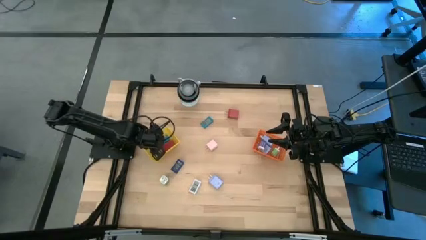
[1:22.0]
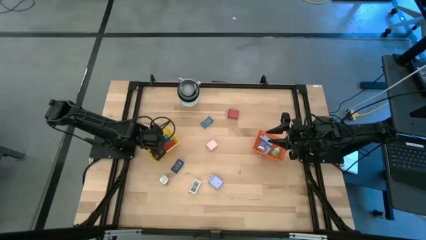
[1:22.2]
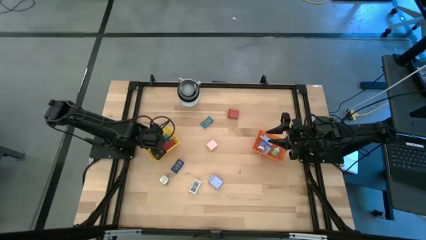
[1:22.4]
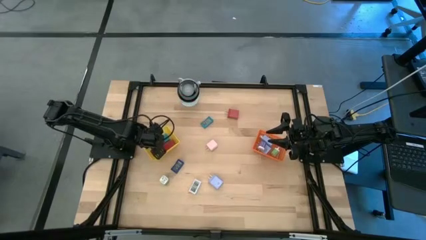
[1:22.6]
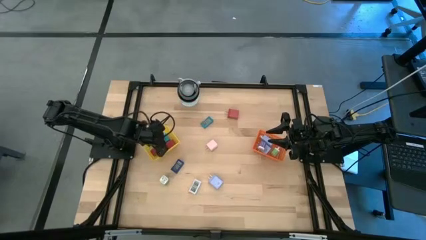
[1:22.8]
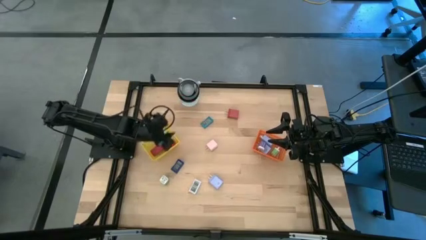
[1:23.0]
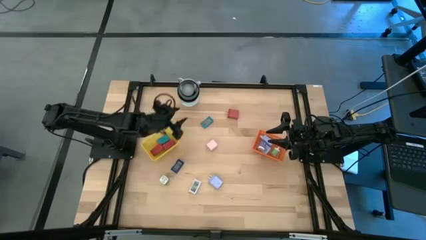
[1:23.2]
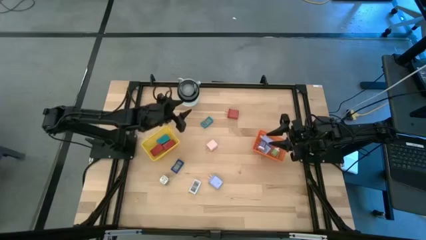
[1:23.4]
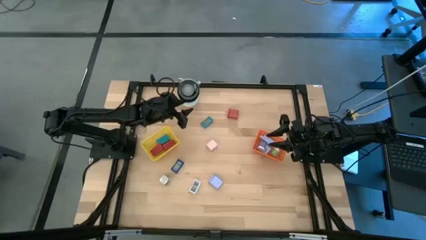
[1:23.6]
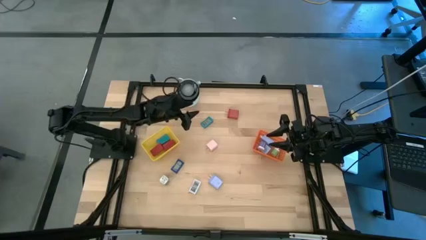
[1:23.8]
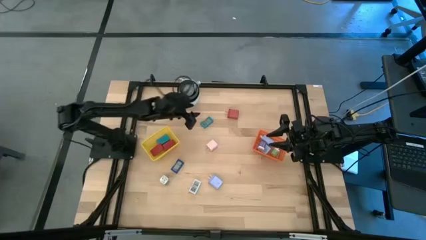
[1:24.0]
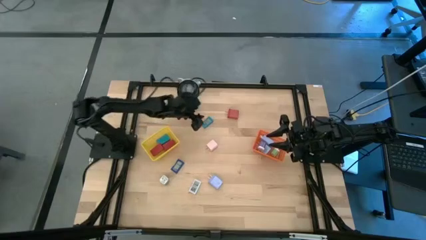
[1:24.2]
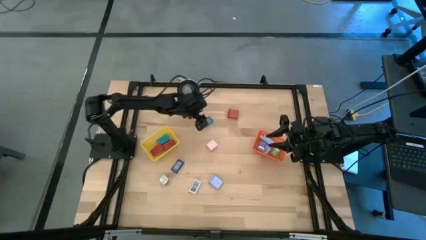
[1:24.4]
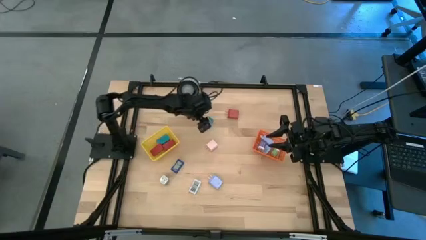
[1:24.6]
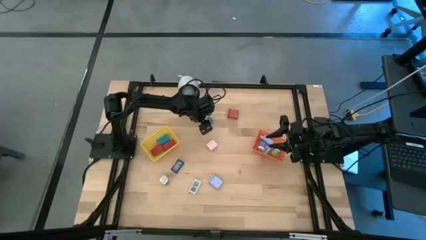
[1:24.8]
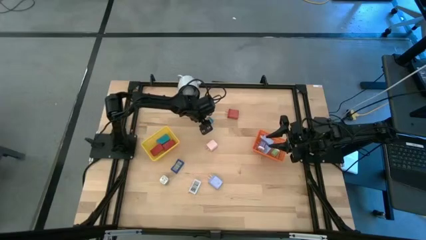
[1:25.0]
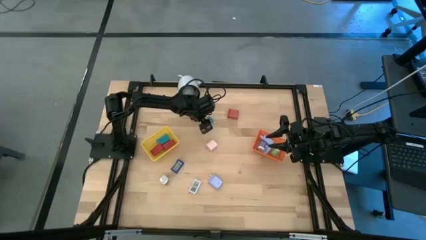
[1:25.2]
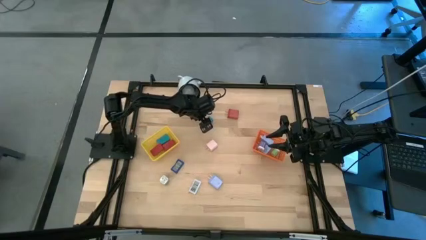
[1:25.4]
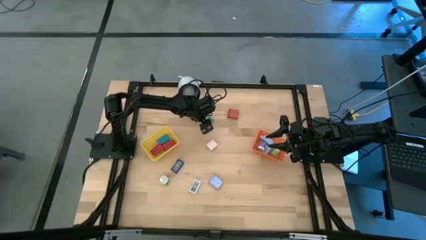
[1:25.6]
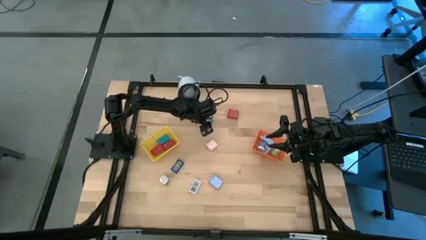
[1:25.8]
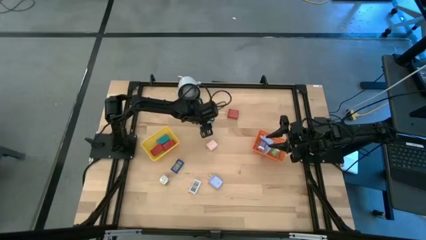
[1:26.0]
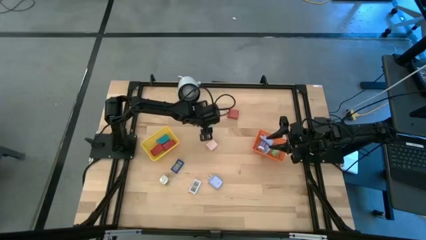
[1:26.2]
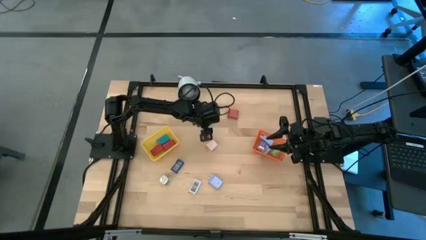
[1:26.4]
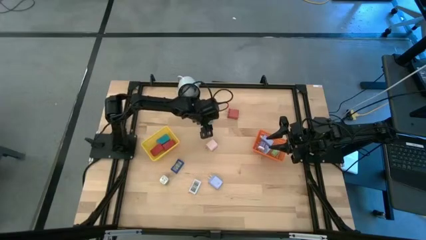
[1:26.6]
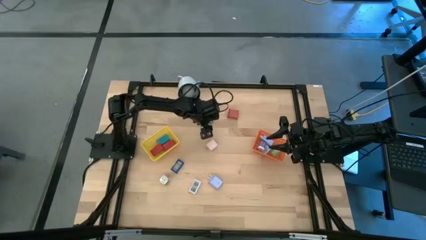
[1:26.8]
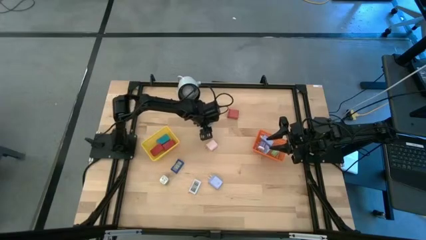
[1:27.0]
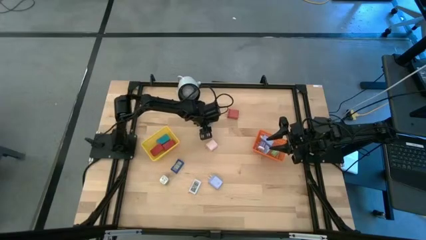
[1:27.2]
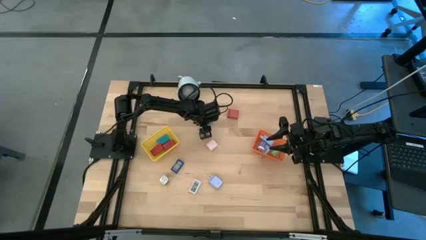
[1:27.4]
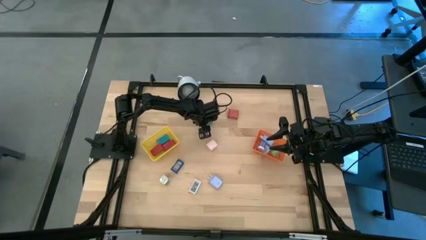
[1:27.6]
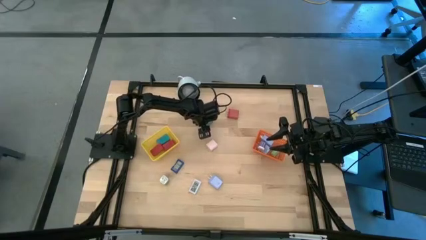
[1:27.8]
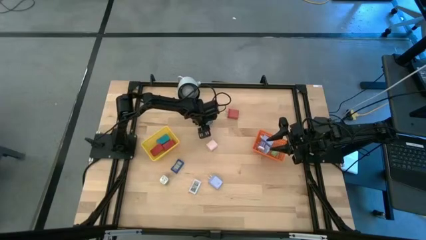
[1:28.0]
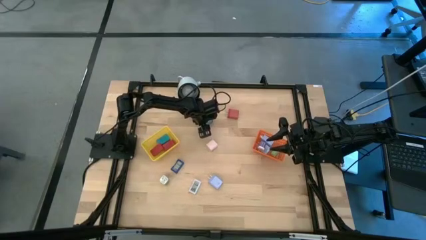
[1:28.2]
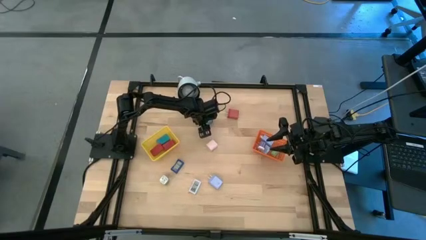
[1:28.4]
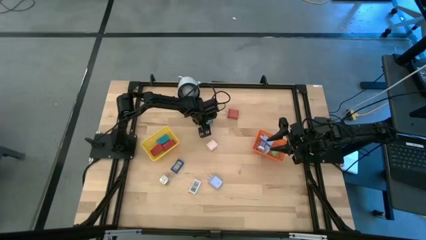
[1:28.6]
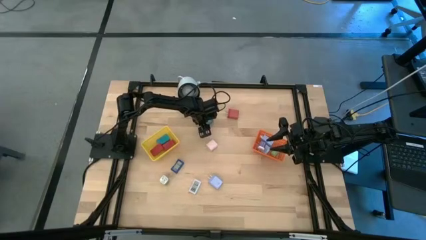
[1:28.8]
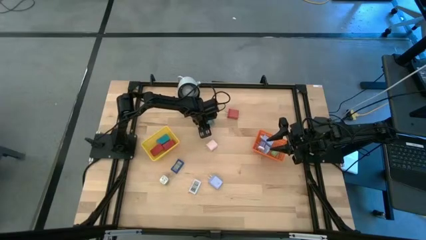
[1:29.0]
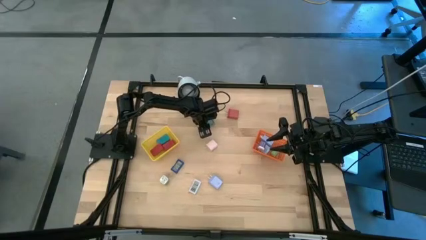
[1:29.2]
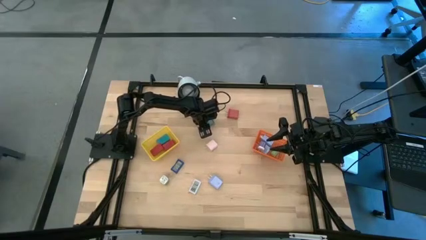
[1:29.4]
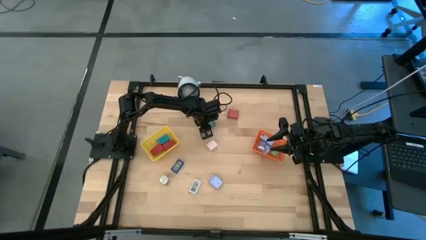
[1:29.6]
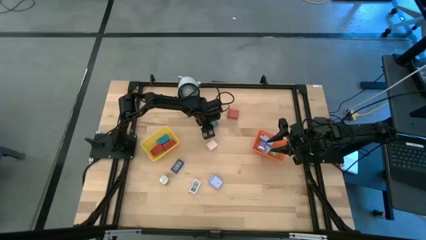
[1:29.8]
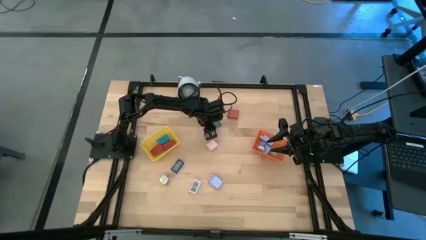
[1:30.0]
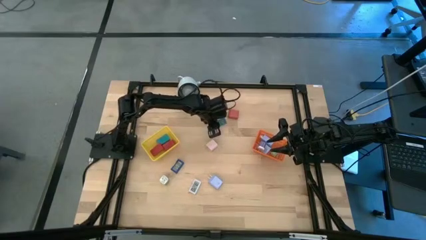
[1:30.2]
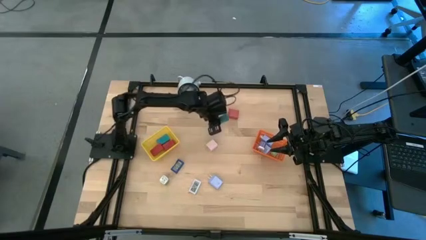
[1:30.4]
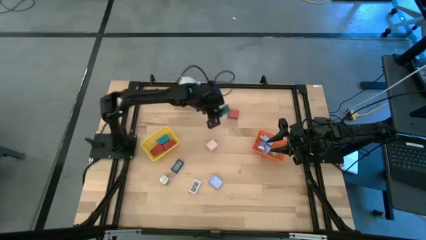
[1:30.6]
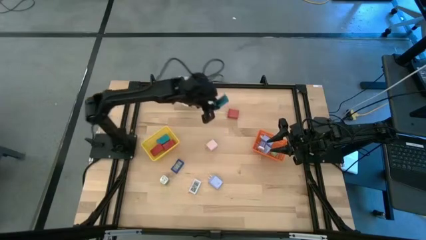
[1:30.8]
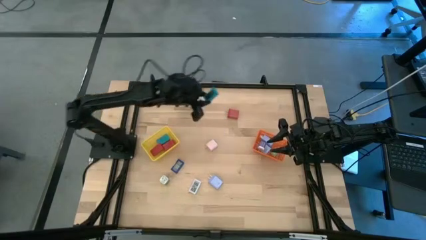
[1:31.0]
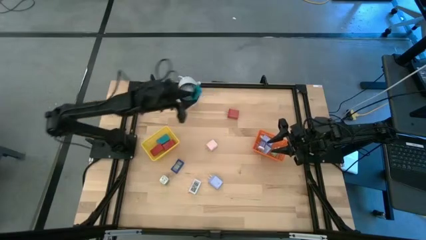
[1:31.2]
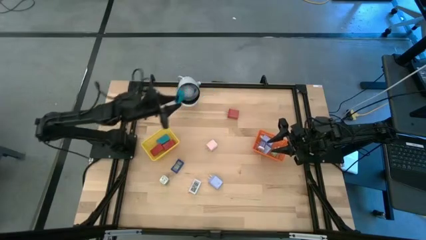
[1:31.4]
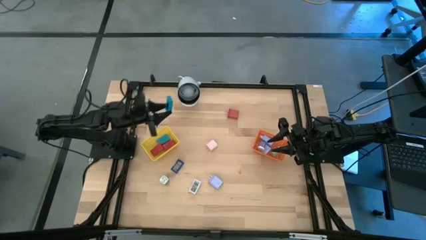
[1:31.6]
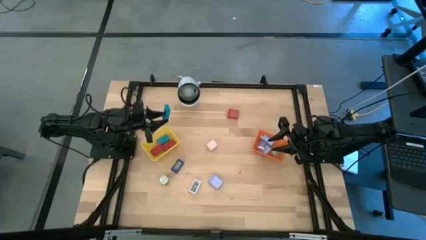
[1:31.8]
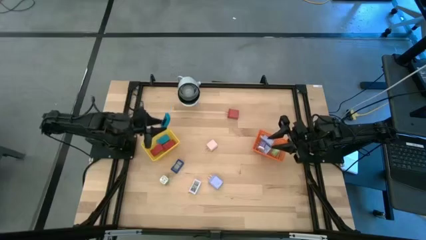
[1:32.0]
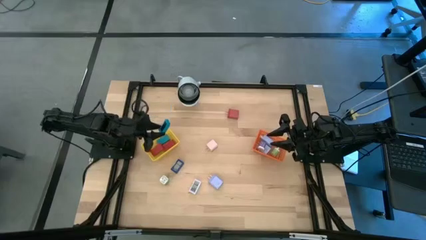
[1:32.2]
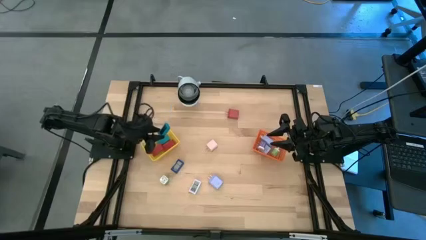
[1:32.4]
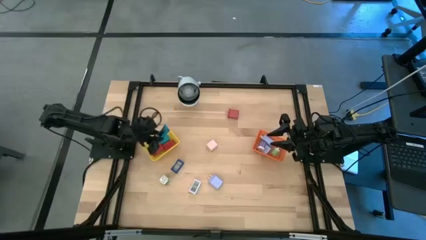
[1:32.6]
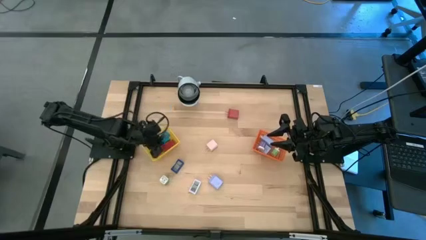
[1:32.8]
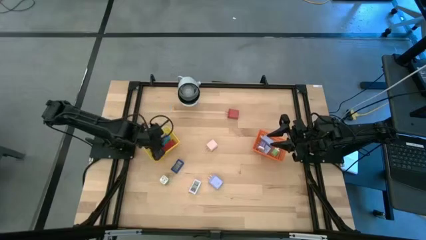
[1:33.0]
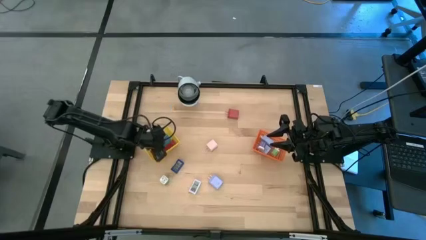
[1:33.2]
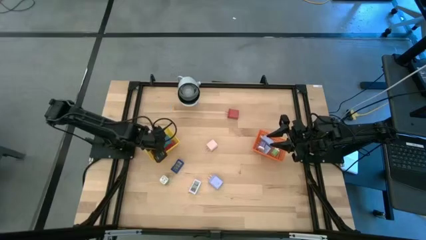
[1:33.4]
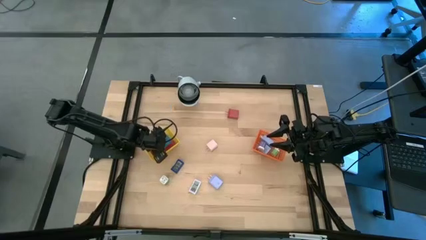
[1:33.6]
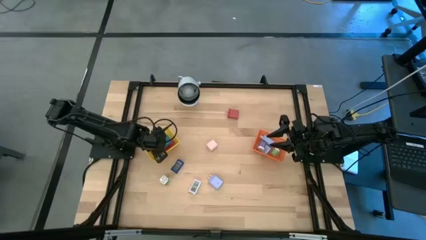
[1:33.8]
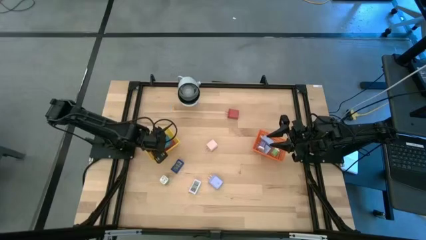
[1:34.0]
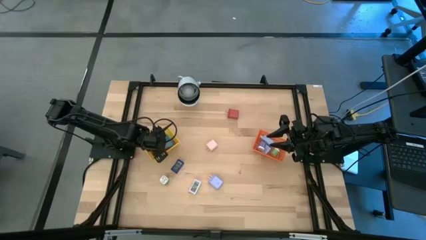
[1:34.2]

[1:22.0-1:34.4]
Task: Pick & Place Office items
Put the blue digital timer into the yellow basket
